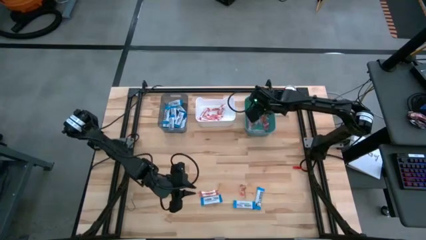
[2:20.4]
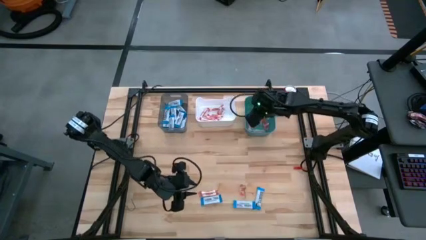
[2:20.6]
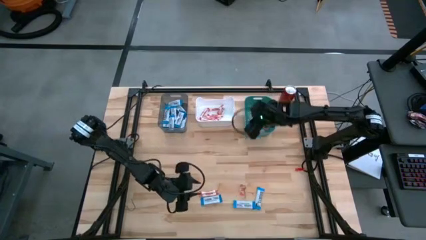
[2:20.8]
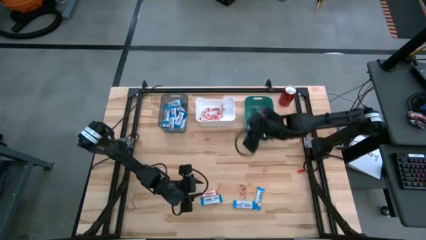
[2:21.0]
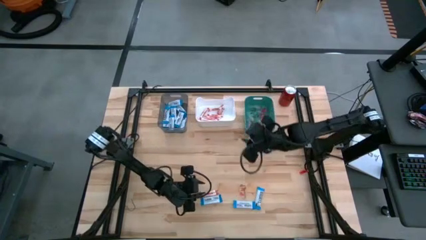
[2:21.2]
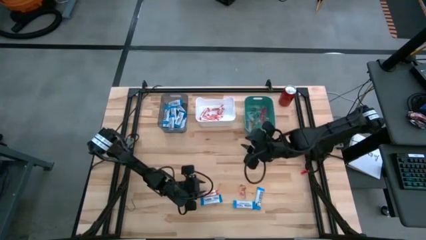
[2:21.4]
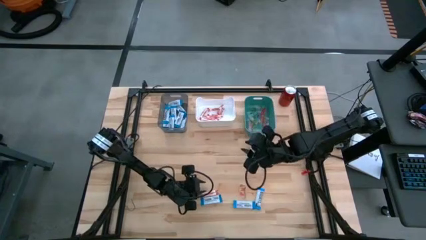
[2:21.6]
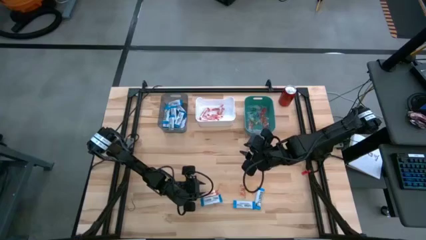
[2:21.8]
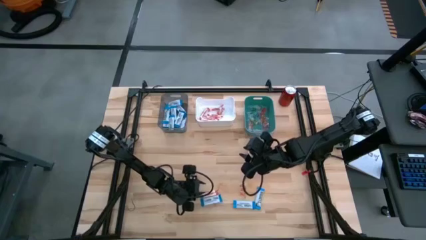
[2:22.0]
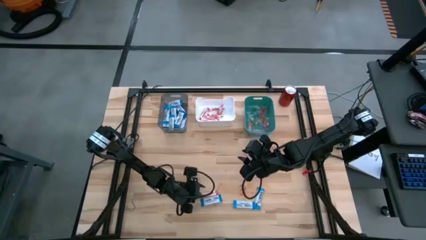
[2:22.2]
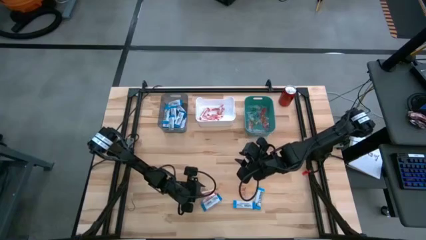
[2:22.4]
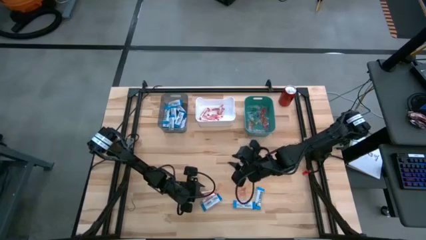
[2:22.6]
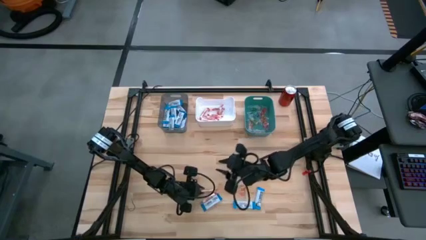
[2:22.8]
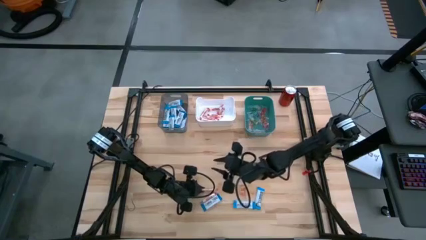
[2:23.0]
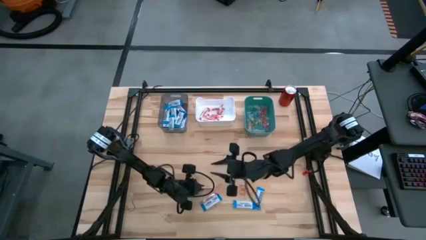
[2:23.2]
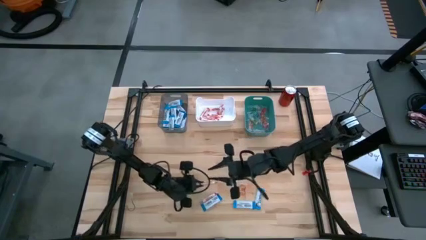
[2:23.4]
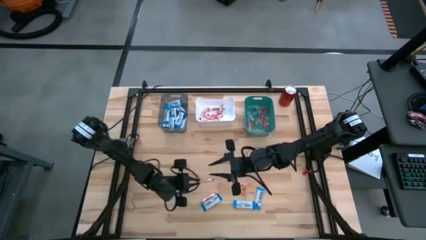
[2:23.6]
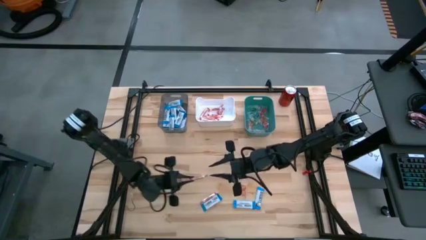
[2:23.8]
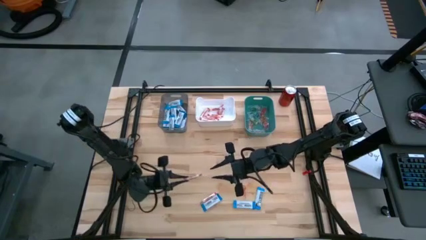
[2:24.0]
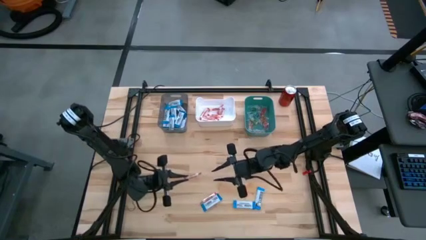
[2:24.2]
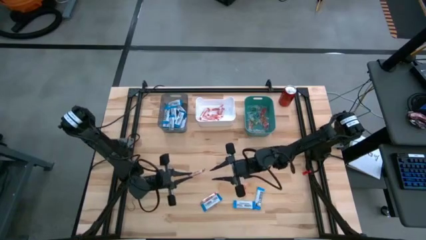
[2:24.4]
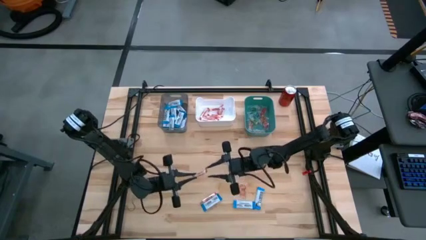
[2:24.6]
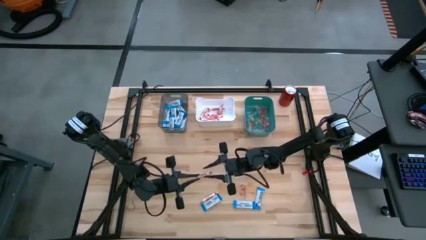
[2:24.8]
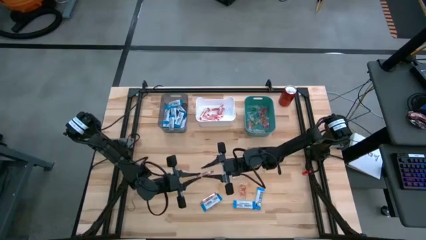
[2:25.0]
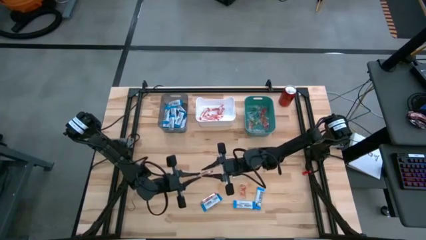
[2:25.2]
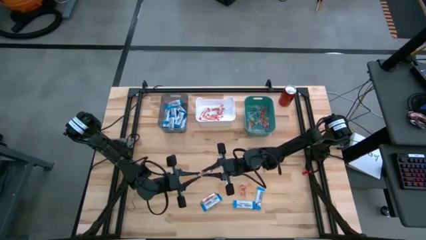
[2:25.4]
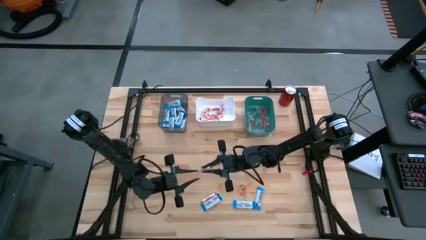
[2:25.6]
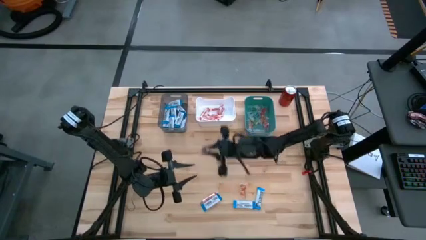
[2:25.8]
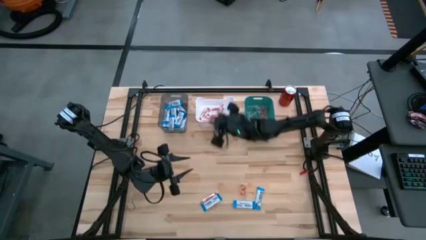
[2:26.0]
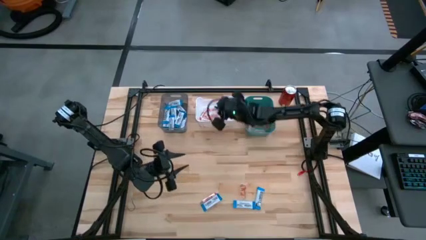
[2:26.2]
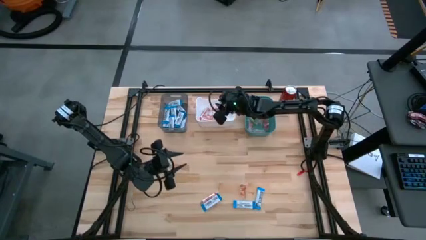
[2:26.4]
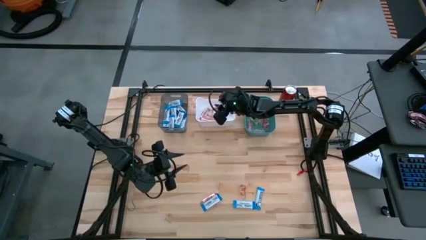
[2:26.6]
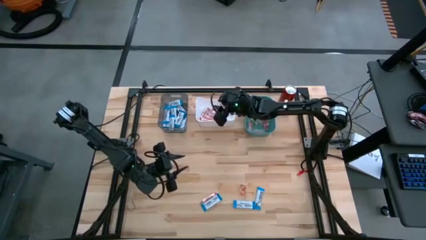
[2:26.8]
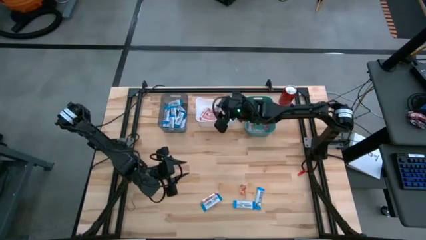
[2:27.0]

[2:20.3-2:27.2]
Task: Sort candy
Put the orange candy into the white bin

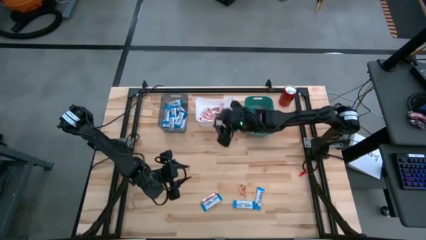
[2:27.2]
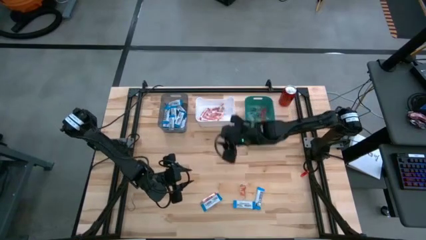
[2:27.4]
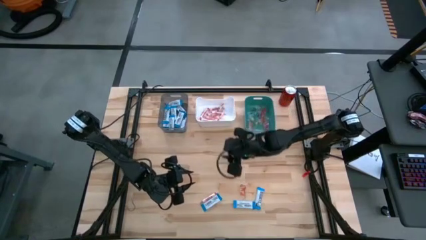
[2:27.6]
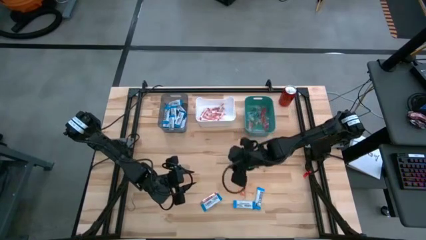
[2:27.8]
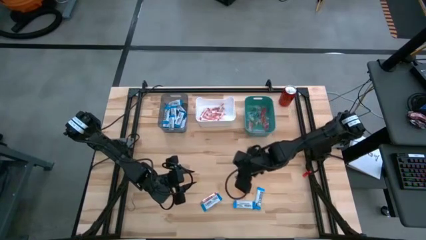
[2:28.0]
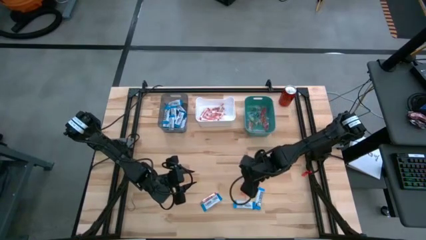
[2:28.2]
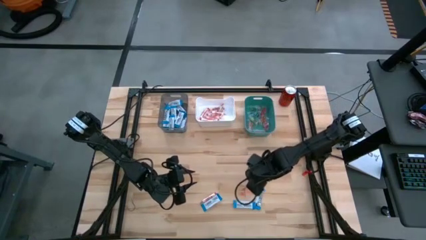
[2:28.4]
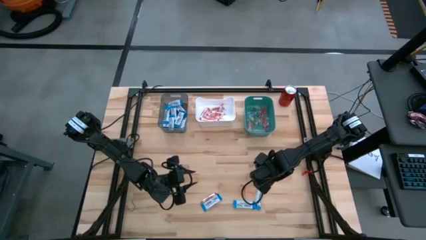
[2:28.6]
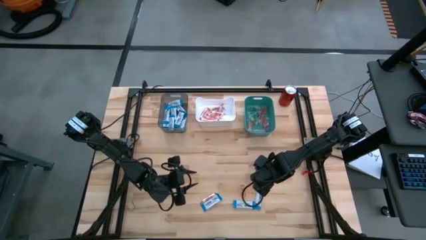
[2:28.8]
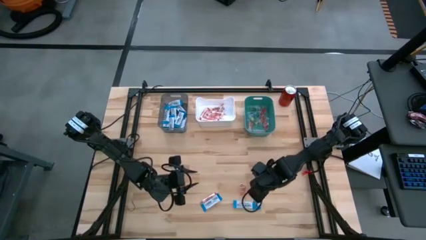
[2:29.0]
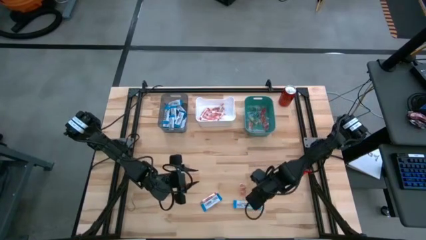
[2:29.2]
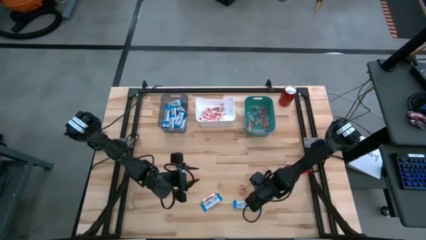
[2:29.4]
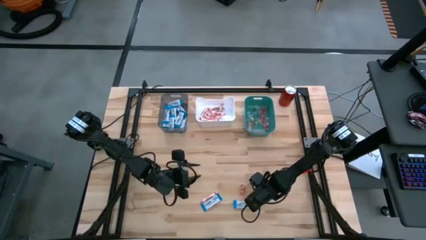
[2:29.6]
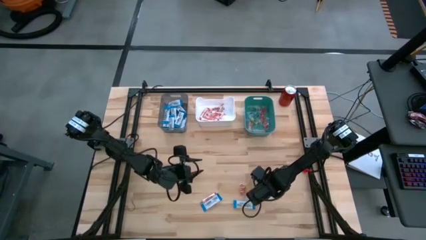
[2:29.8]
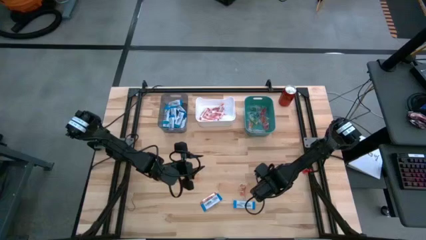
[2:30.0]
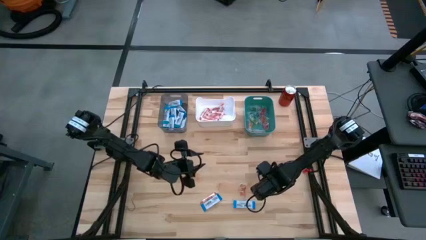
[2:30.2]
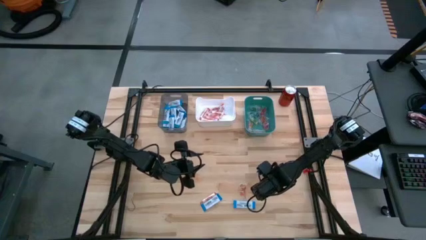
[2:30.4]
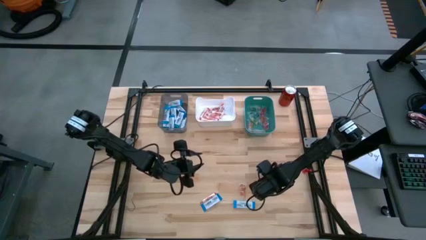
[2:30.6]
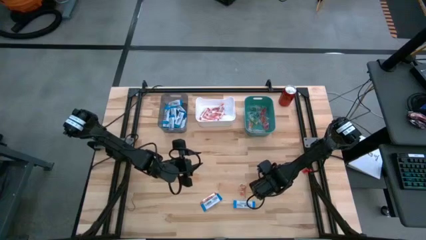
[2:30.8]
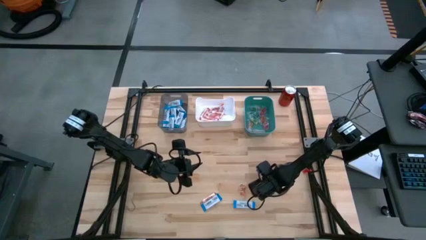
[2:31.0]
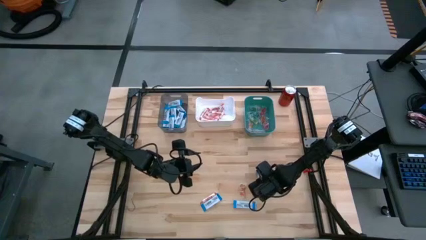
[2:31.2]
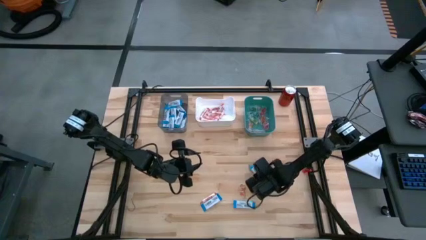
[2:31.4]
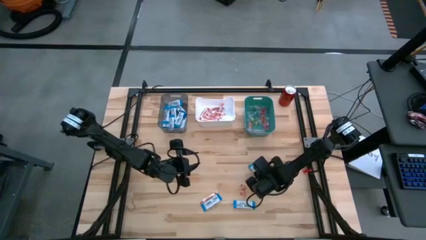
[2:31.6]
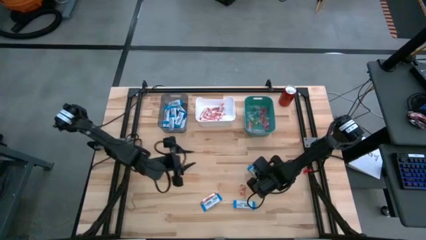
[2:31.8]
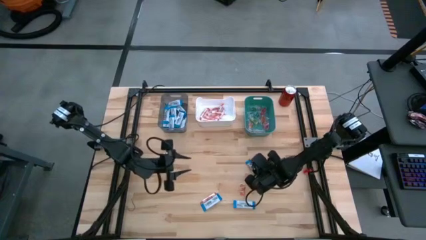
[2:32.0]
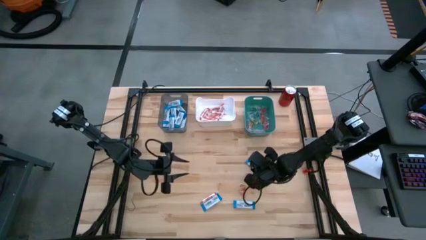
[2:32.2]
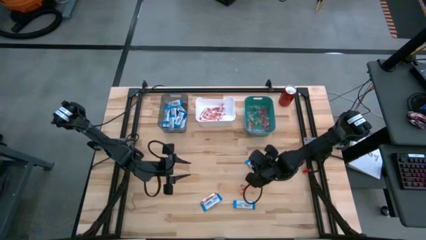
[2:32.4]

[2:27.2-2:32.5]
Put the white chocolate into the gray bin

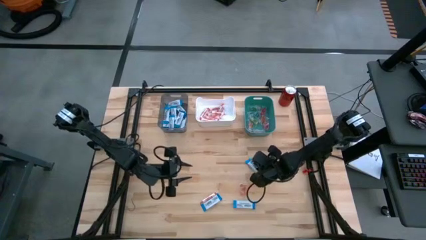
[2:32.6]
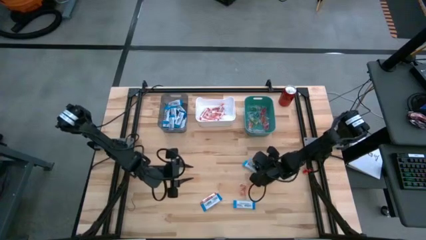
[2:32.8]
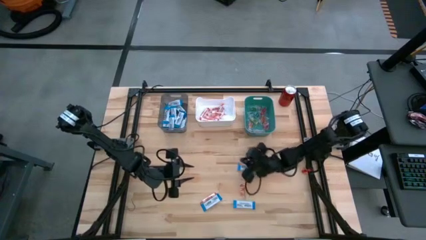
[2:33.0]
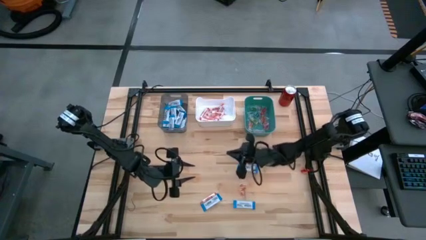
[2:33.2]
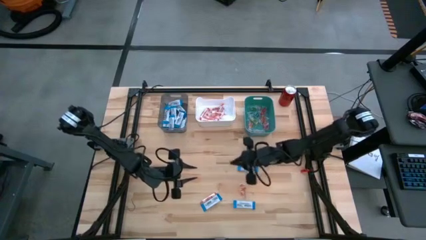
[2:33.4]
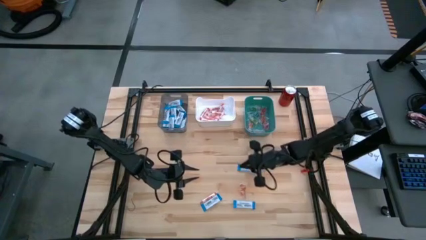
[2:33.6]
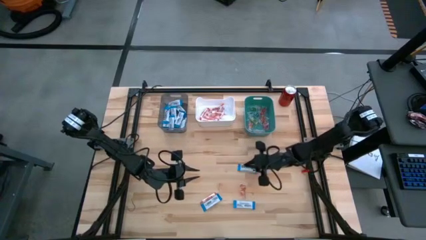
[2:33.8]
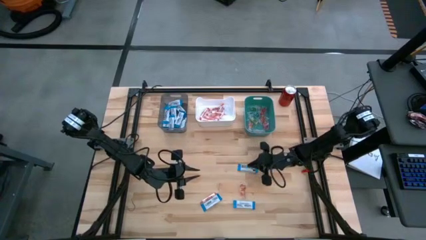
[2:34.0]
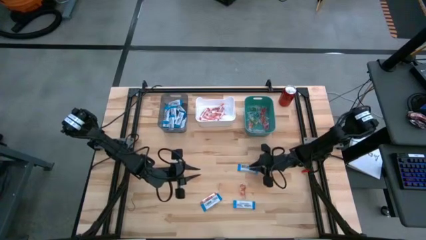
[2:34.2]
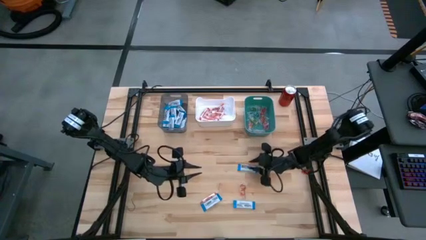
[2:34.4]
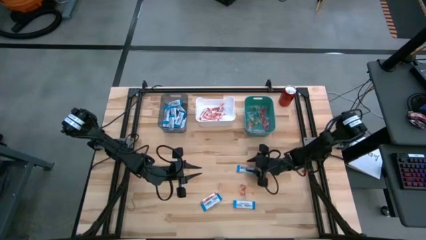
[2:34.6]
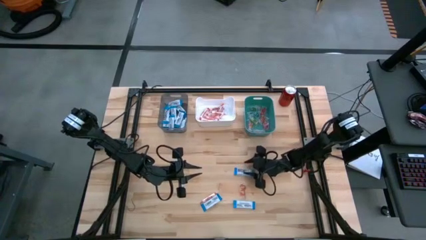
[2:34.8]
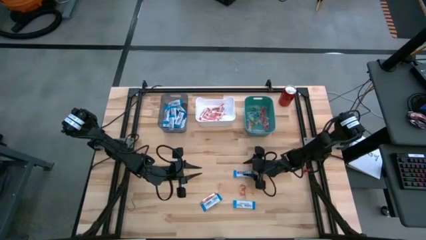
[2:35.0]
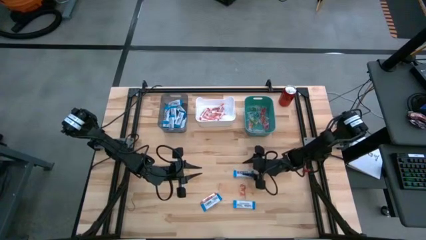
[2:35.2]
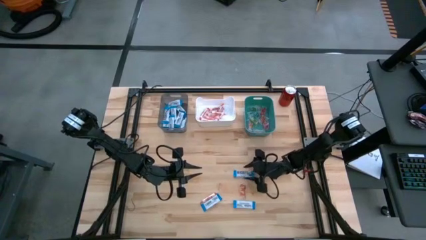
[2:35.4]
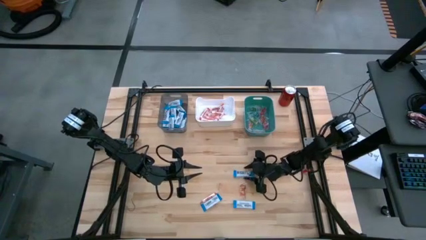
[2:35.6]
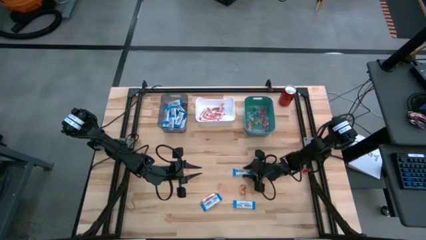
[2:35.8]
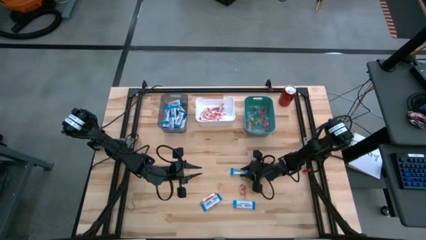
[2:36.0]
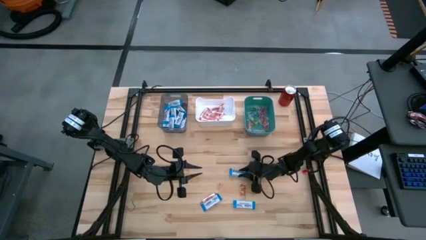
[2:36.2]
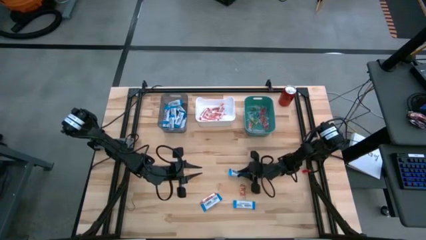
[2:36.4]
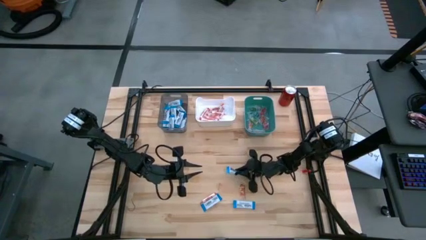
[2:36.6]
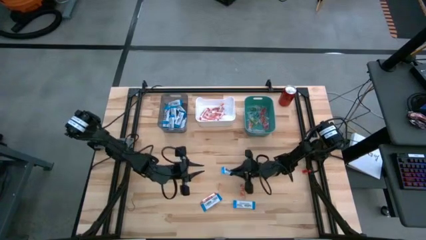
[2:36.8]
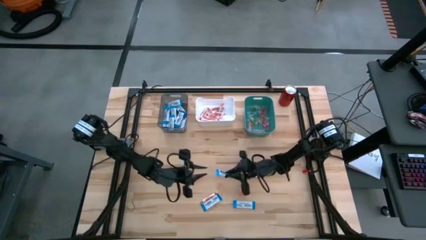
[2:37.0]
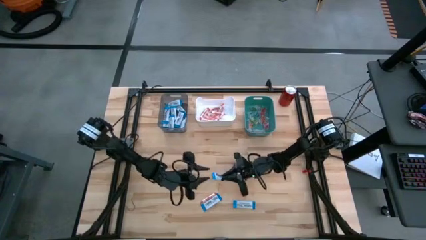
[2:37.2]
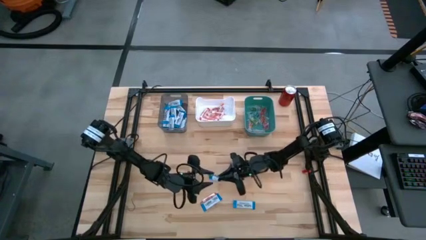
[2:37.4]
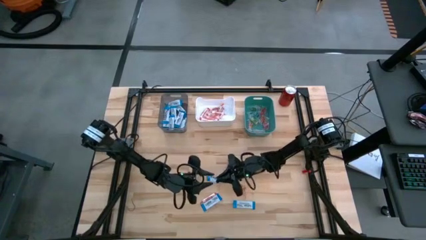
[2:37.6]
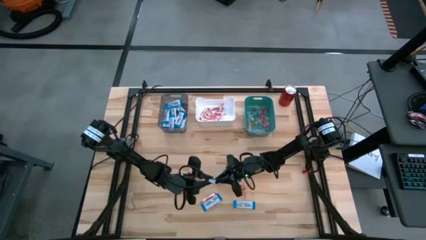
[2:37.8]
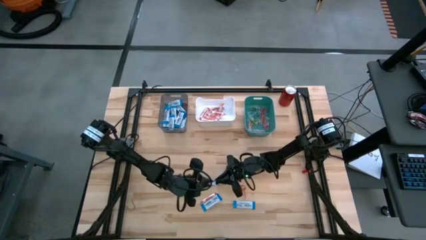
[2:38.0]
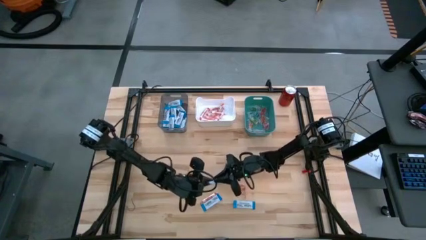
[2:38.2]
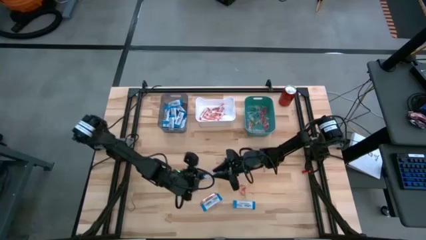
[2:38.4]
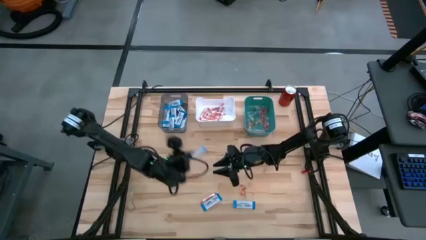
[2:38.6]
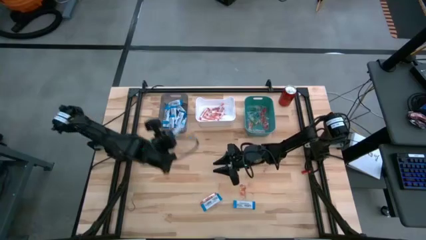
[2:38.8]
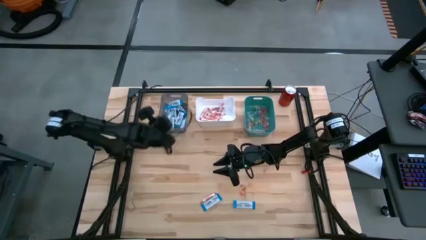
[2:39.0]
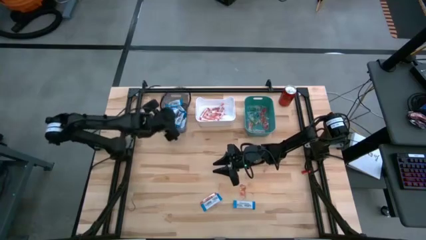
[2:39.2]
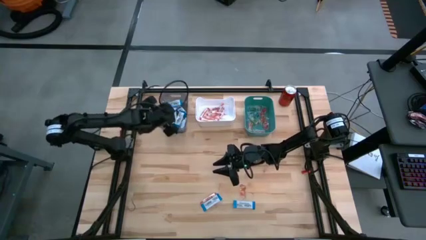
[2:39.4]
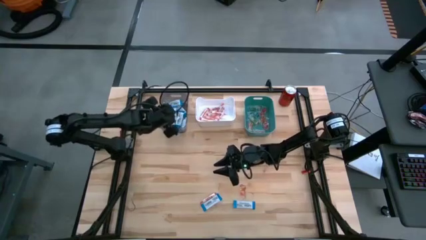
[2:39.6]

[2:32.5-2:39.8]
Put the white chocolate into the gray bin
